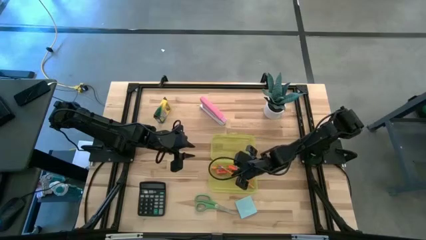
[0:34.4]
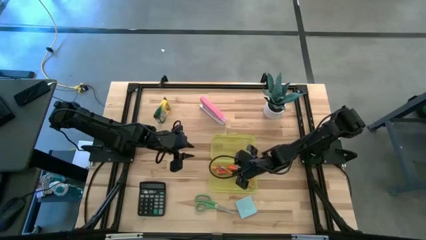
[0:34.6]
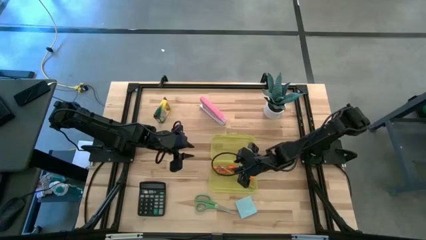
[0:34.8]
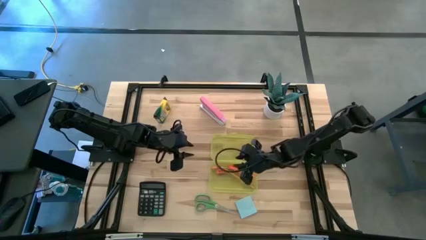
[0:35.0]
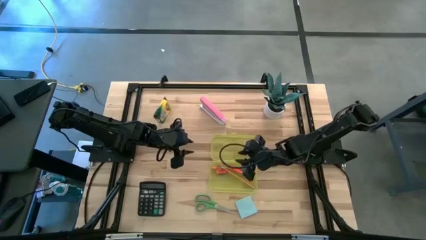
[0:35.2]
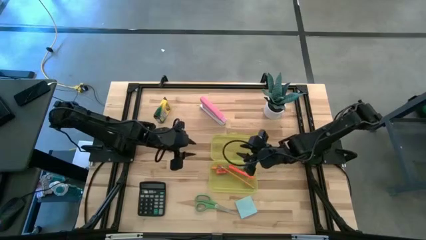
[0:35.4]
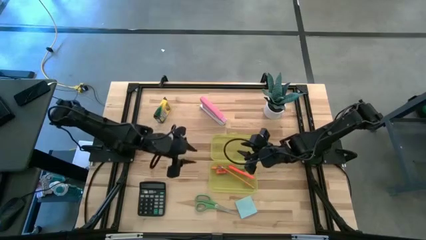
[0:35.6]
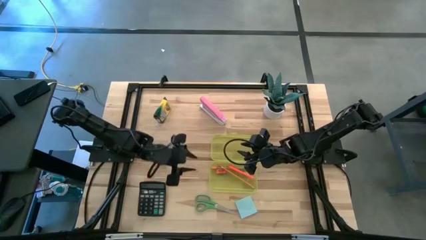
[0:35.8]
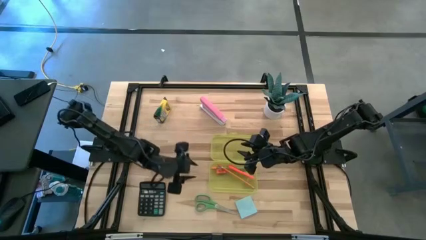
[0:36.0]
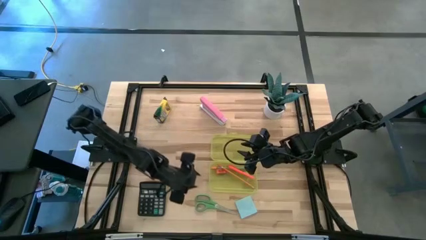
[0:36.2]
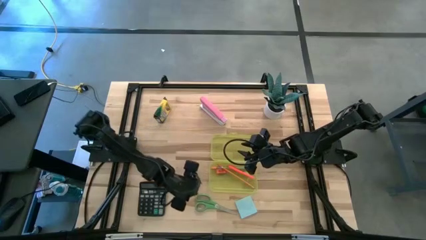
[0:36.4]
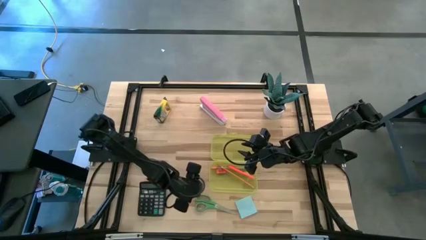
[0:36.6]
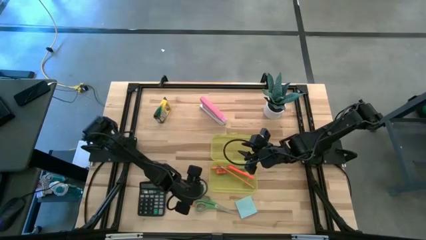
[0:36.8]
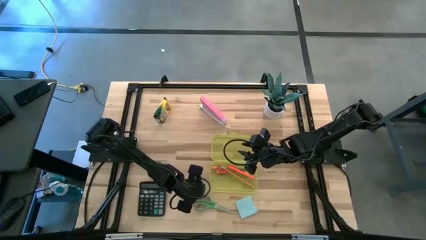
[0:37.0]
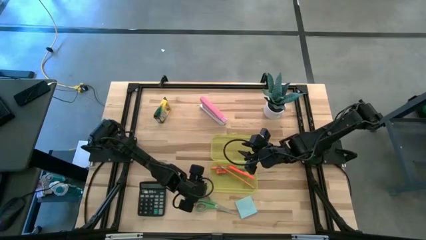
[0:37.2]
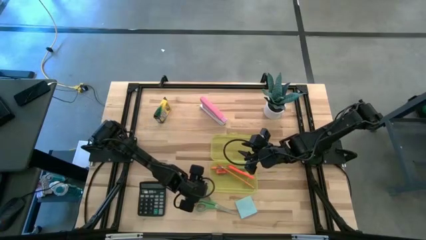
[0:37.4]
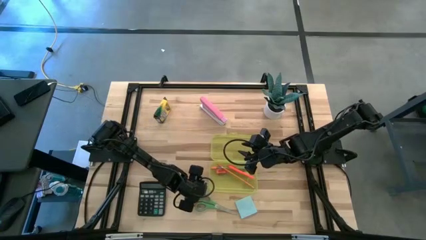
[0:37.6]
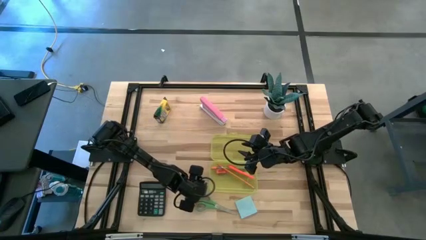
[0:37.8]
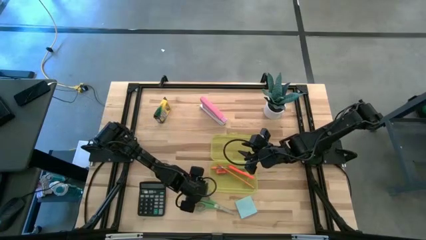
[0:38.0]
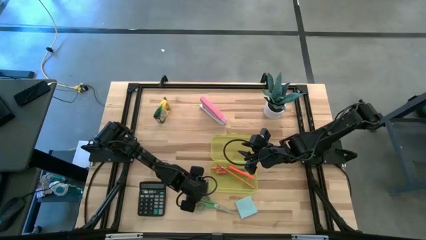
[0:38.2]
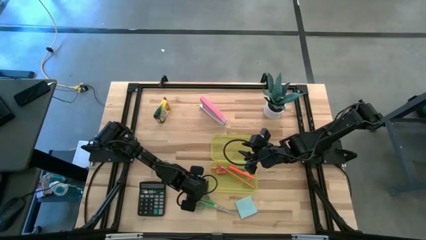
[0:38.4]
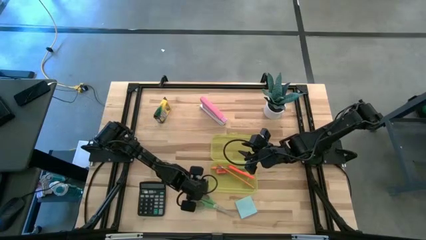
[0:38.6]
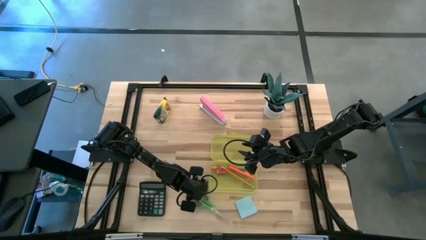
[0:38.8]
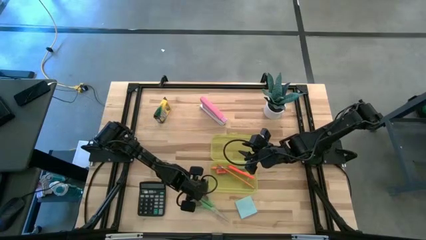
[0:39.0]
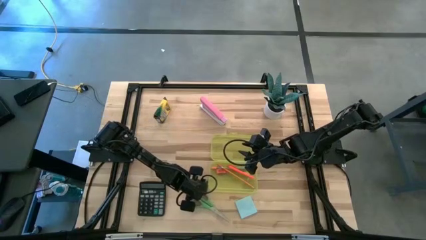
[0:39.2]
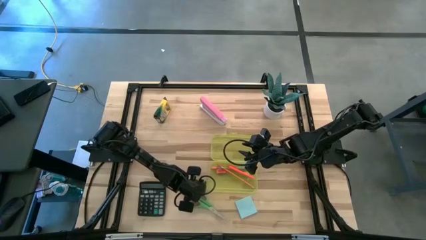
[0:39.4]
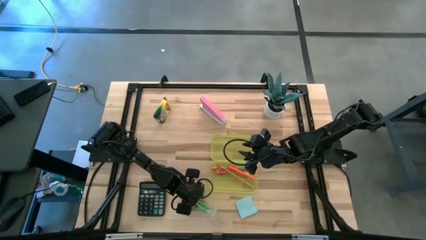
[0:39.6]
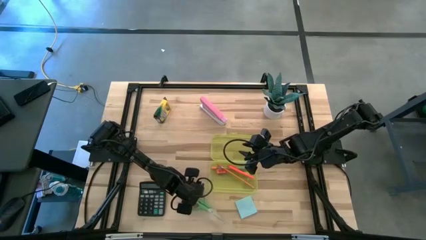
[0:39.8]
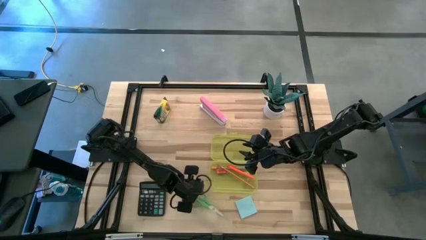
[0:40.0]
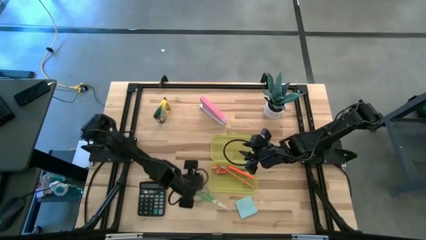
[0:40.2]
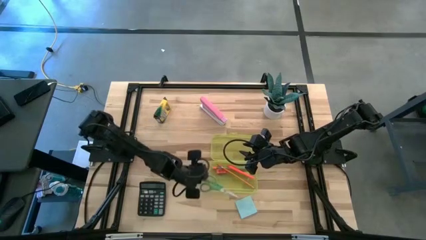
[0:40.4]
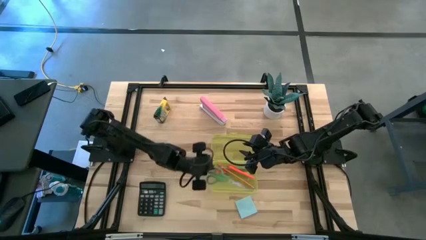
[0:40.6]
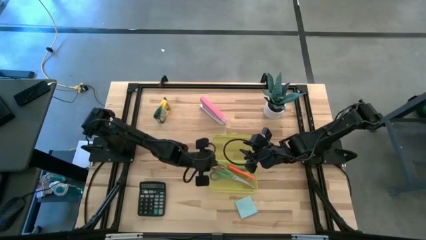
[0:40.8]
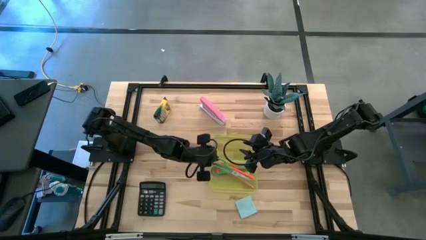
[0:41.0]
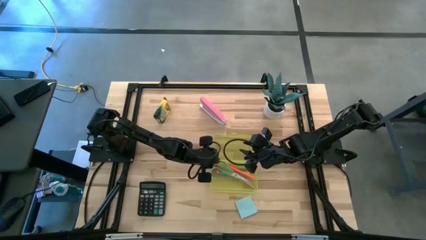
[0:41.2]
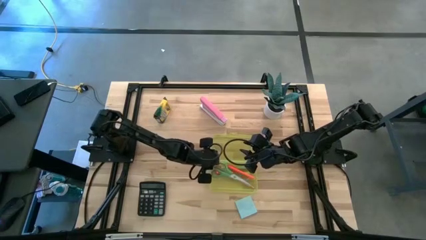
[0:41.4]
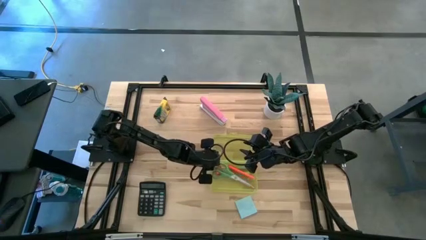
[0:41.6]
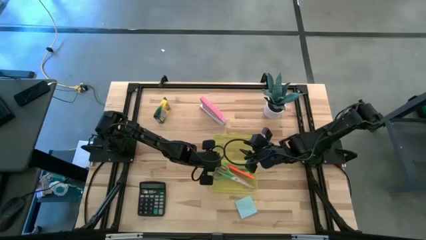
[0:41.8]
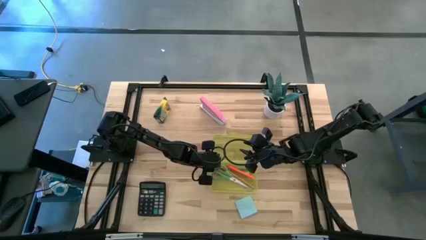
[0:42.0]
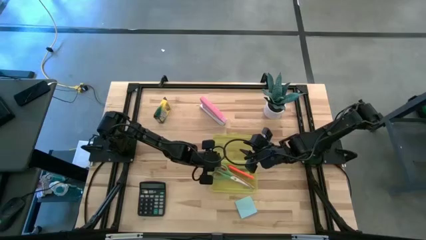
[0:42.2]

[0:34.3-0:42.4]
Task: Pack school essentials
Put the green scissor into the yellow supply box

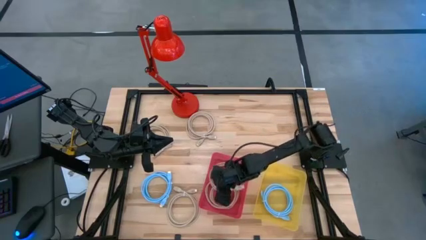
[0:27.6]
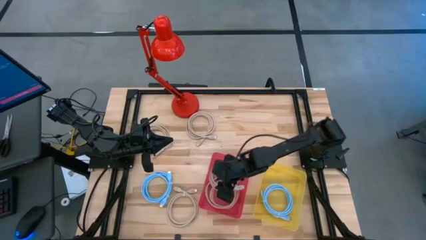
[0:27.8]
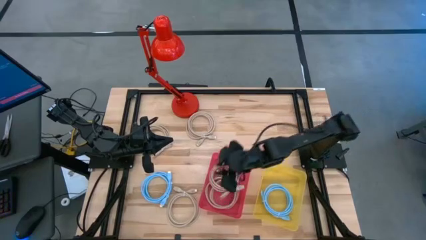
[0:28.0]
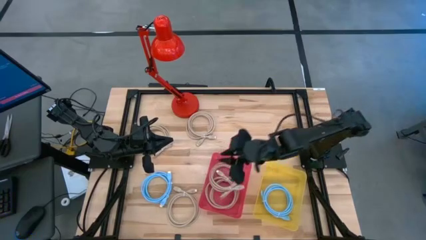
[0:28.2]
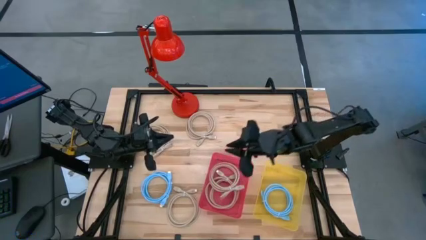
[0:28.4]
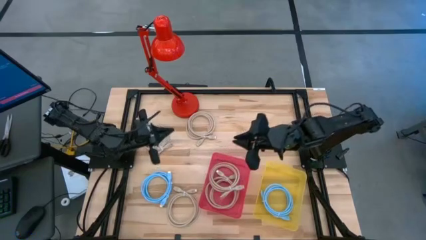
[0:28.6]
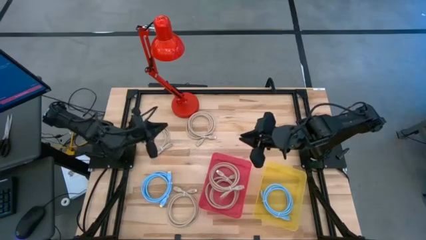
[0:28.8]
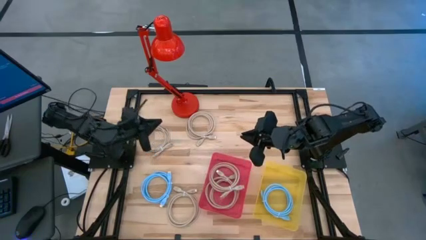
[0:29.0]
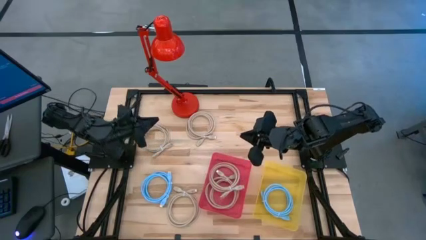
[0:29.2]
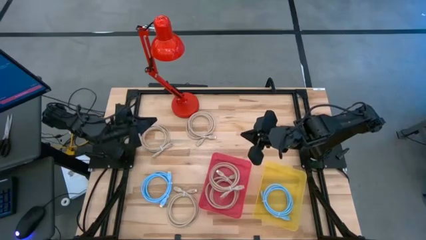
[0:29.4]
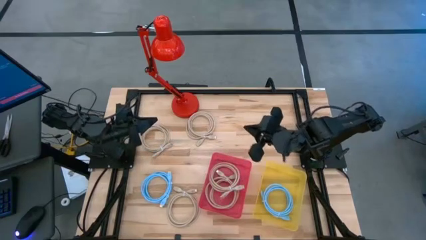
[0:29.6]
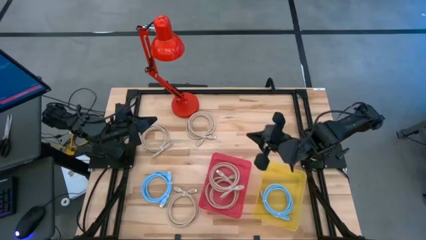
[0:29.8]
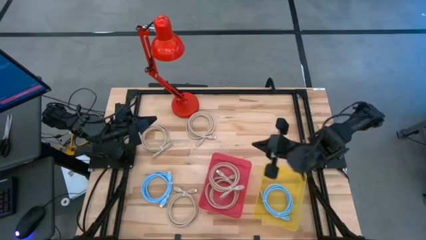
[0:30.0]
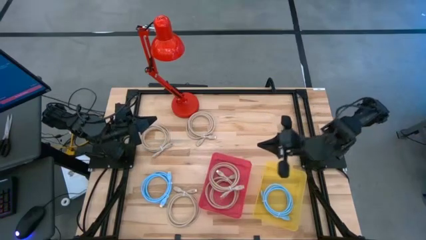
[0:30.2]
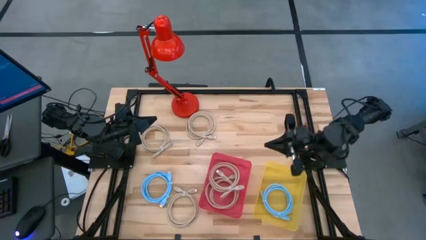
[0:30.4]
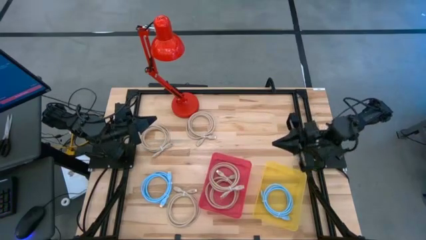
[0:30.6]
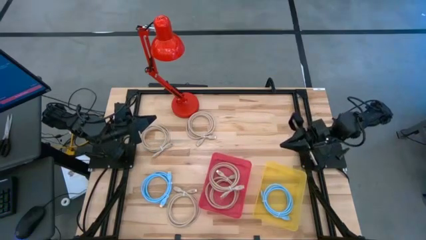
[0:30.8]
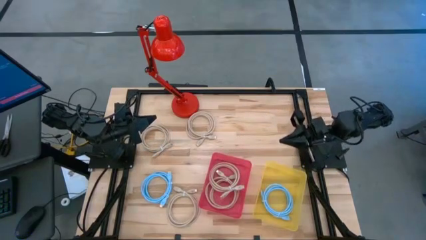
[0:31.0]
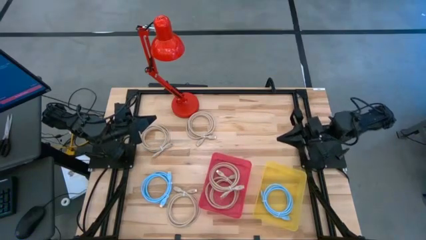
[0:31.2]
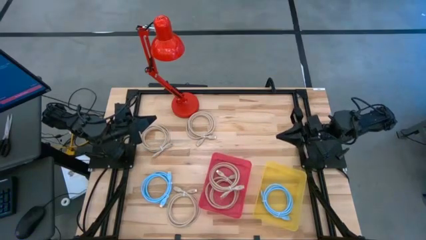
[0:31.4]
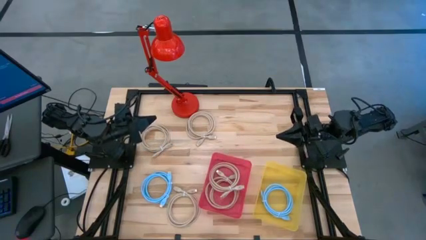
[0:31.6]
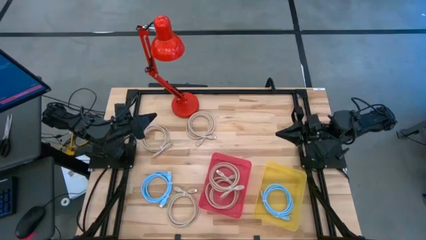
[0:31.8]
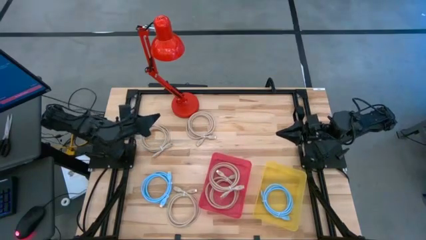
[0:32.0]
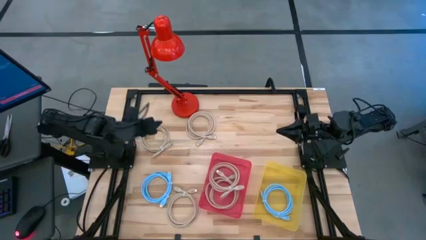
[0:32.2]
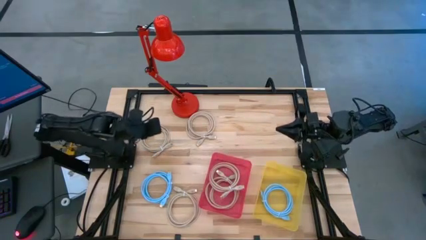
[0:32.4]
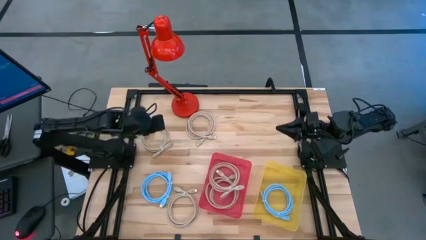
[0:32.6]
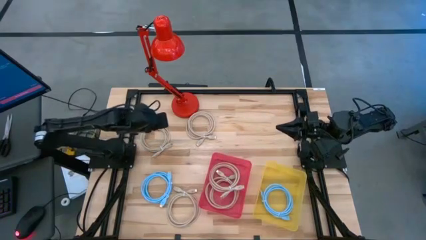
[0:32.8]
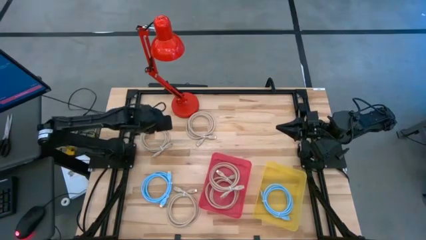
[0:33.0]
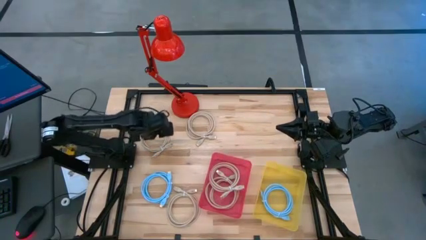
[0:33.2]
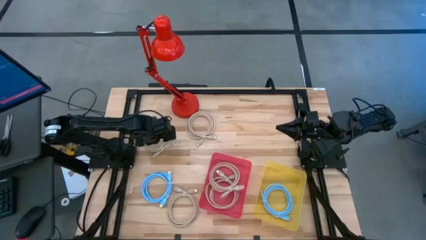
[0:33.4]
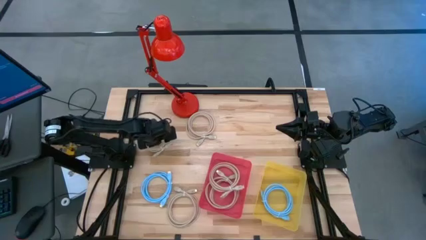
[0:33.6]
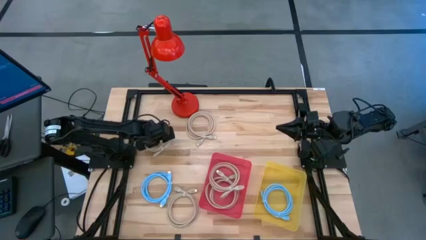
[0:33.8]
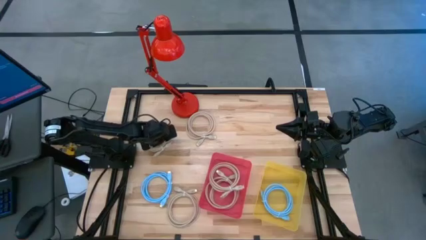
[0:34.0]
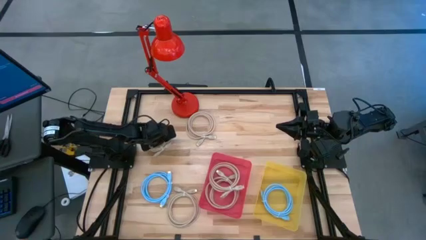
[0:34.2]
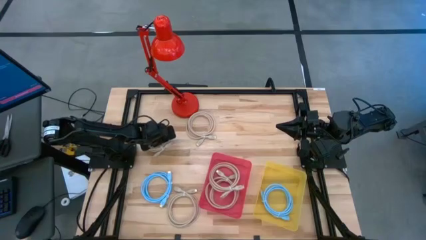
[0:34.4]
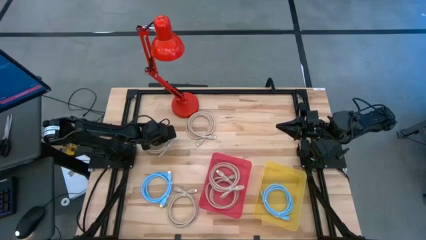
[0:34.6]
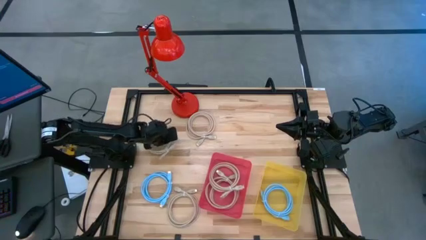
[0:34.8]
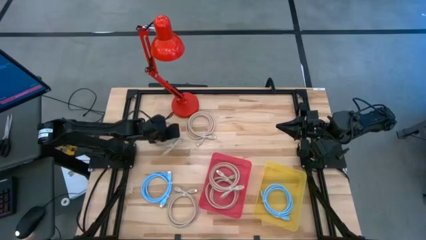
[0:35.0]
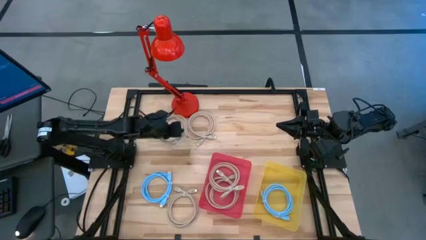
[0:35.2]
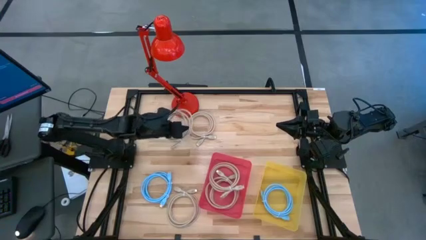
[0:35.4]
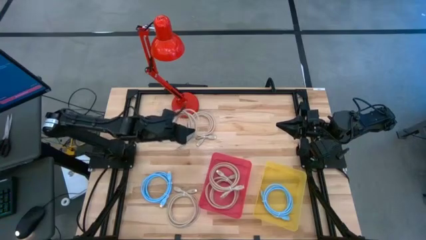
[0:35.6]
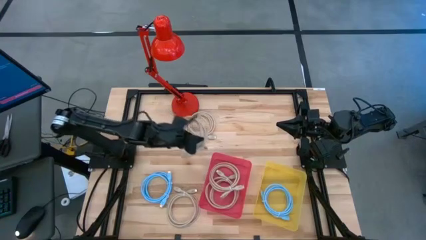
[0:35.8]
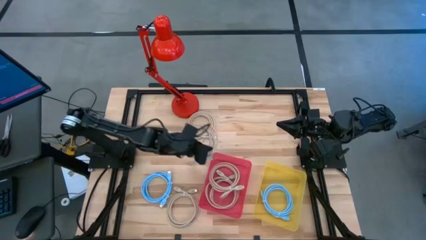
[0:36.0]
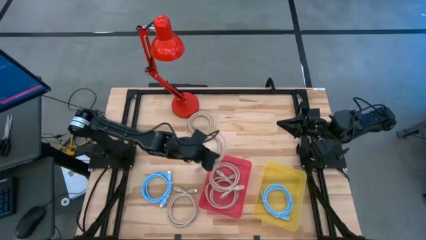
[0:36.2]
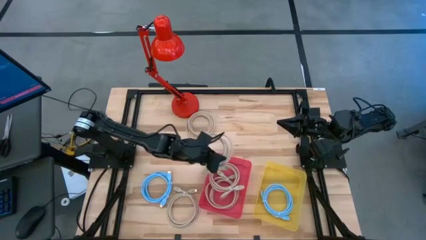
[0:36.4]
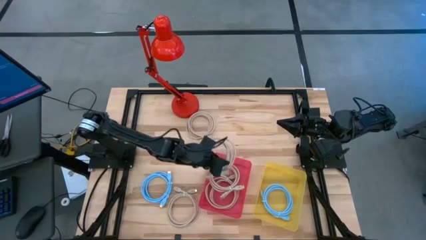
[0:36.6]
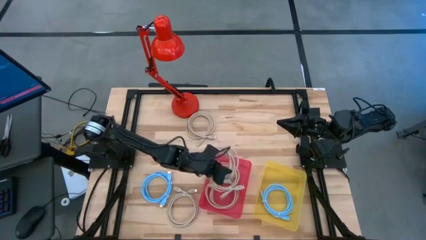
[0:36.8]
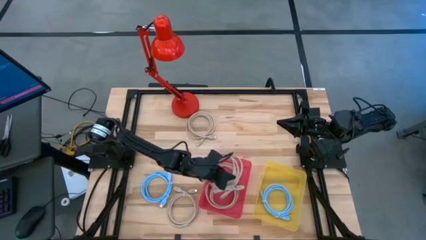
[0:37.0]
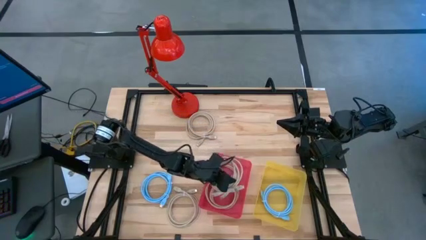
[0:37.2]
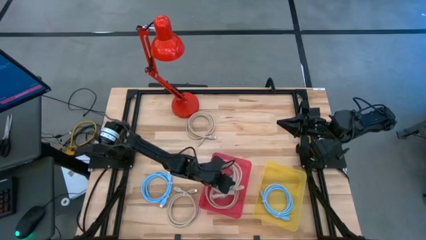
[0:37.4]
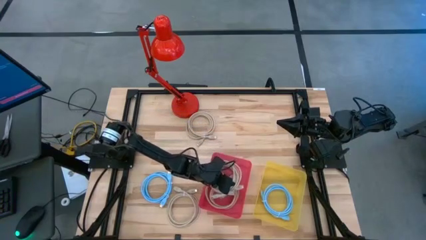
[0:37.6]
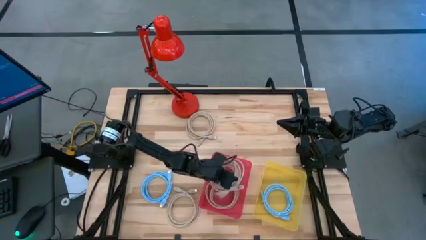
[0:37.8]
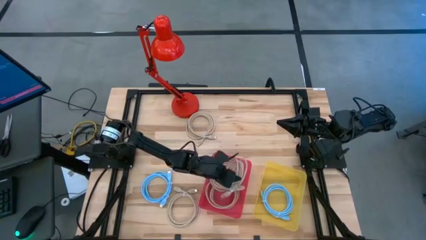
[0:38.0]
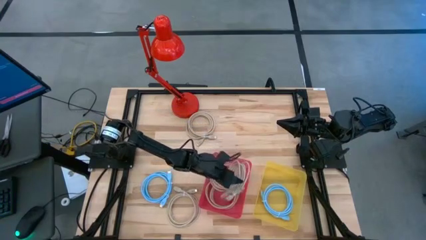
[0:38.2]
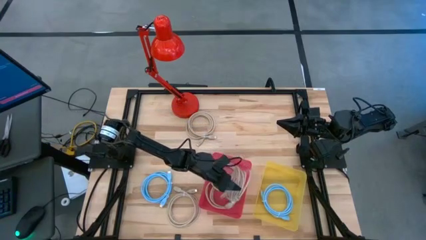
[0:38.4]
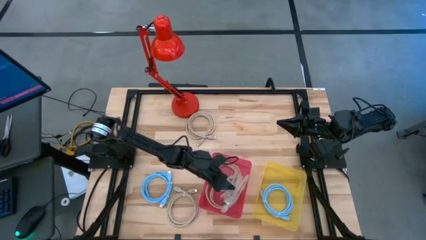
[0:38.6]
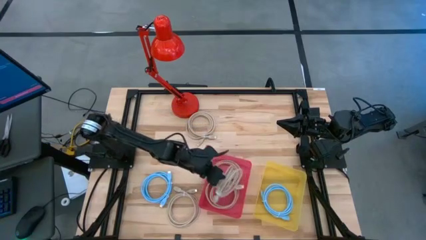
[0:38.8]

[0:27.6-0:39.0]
Task: Sort HDMI cables
Put the brown HDMI cable into the pink bin
